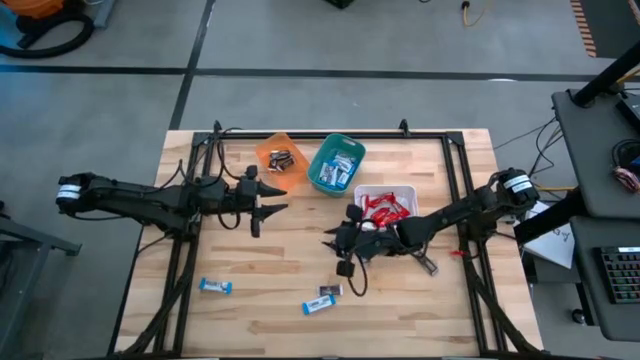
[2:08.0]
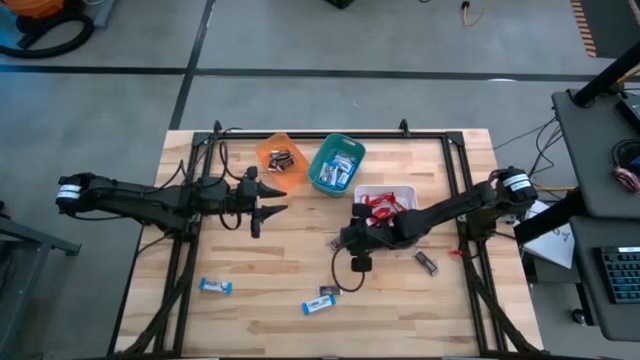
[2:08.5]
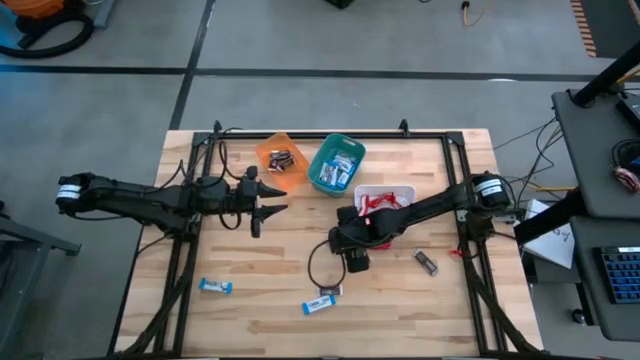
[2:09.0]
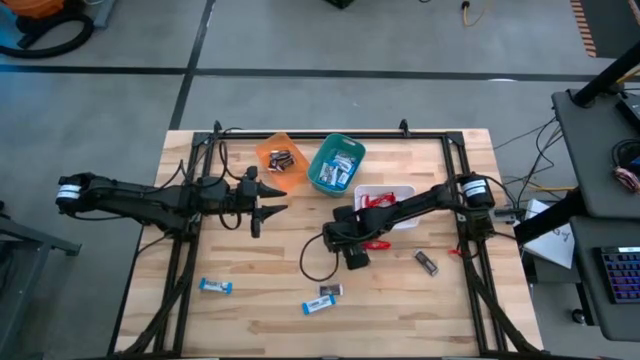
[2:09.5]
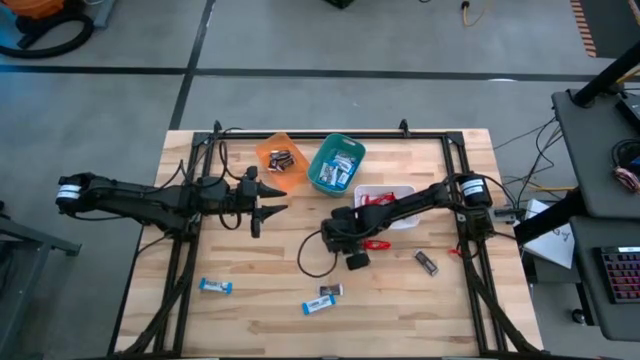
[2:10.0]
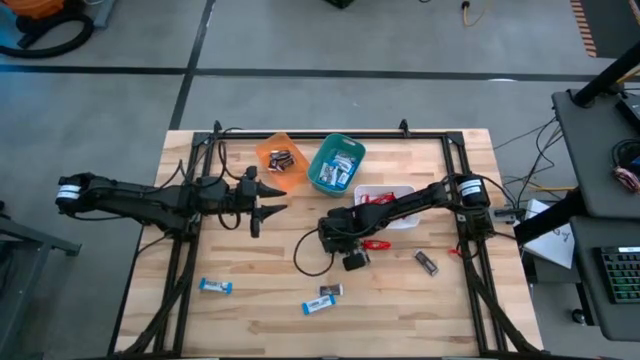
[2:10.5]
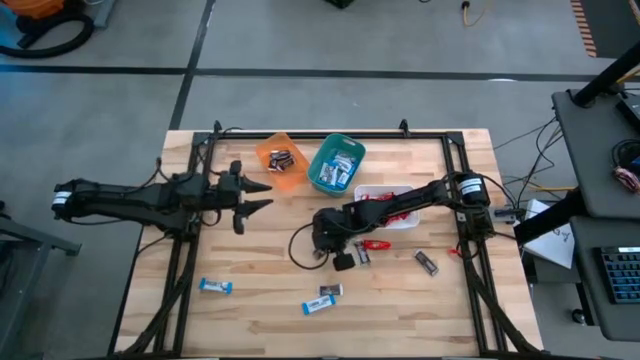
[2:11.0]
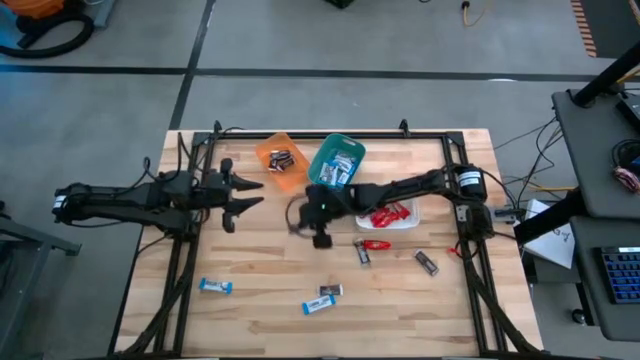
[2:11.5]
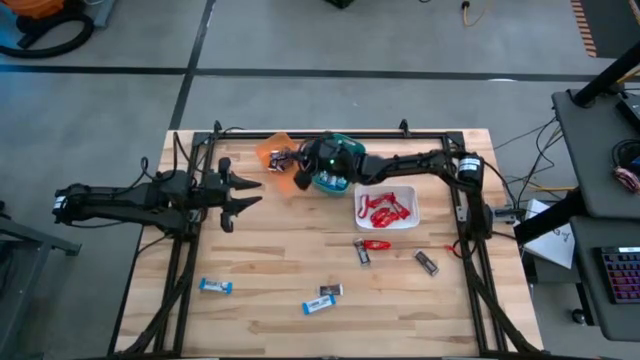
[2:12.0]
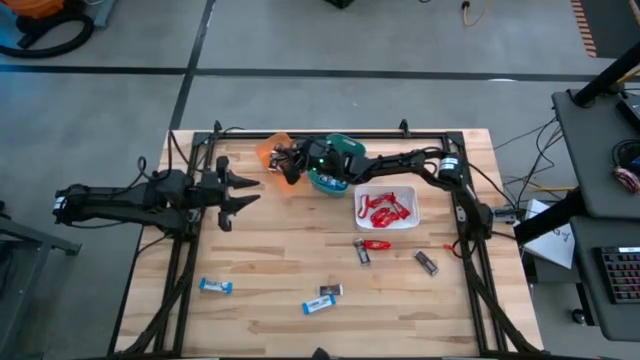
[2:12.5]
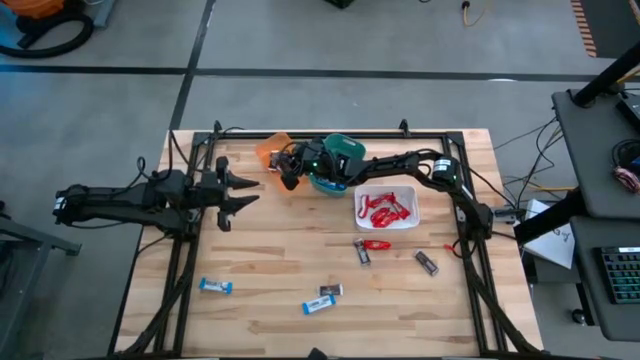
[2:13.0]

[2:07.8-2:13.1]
Task: Sort candy
Put the brown chocolate bar into the orange bin

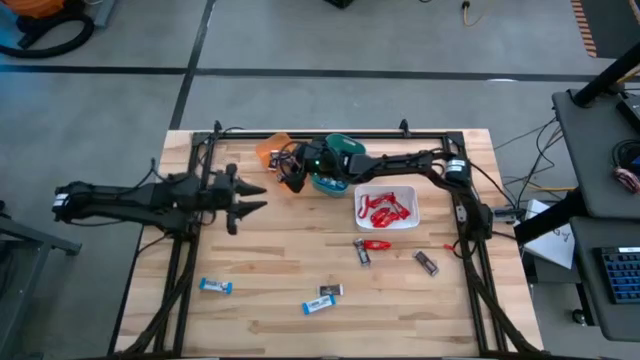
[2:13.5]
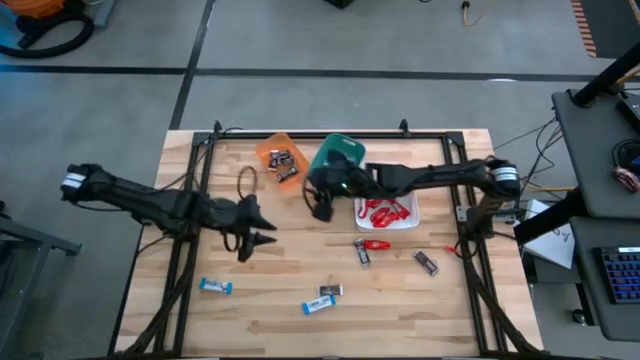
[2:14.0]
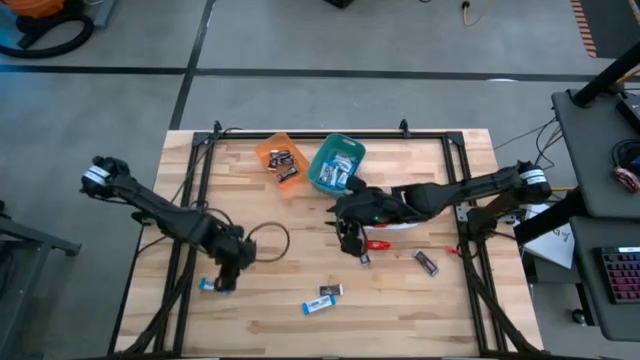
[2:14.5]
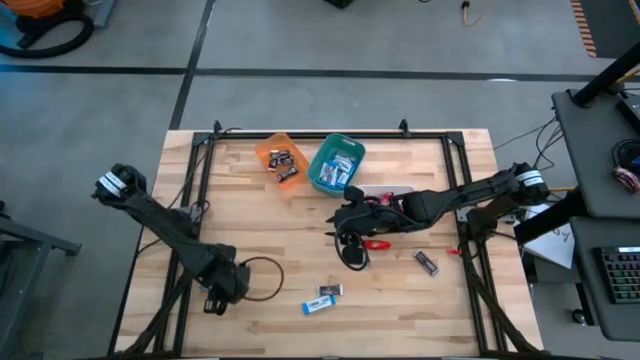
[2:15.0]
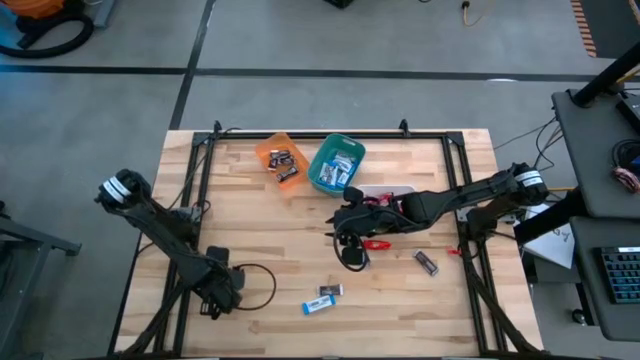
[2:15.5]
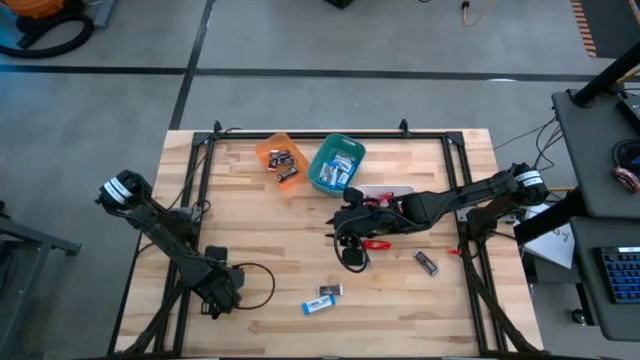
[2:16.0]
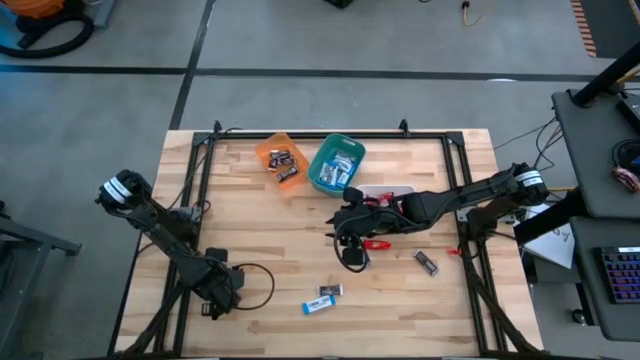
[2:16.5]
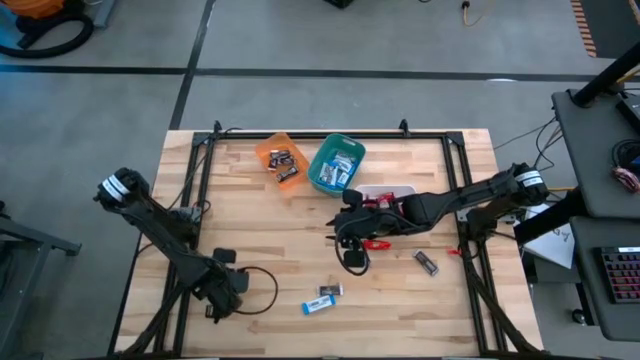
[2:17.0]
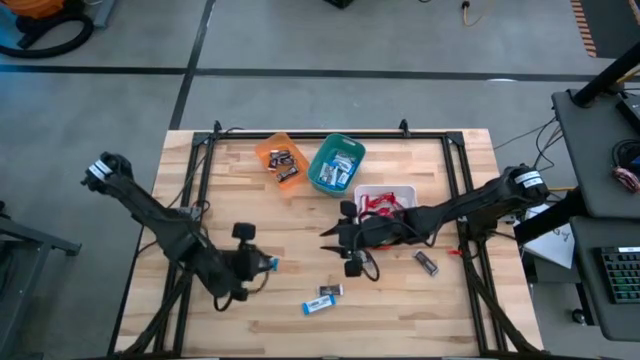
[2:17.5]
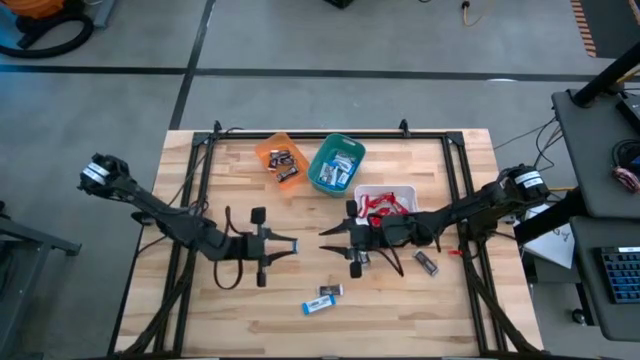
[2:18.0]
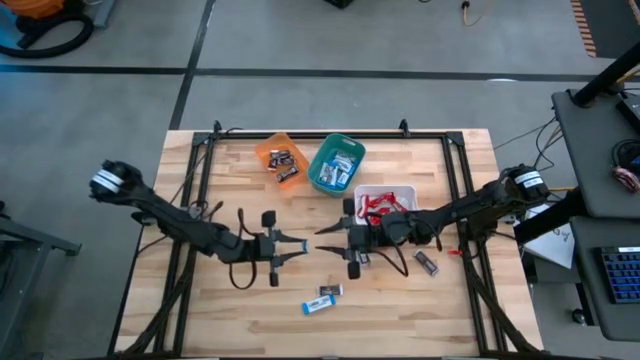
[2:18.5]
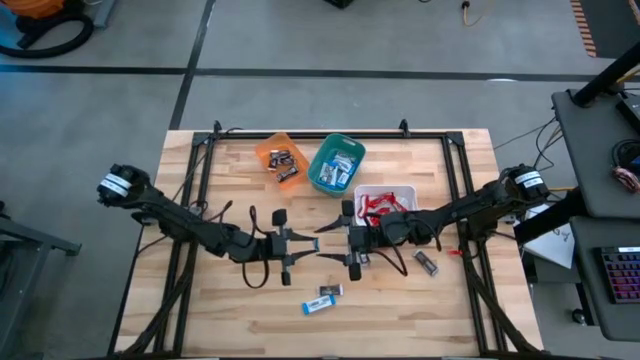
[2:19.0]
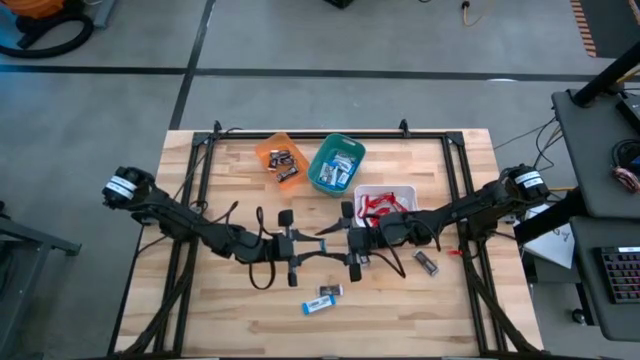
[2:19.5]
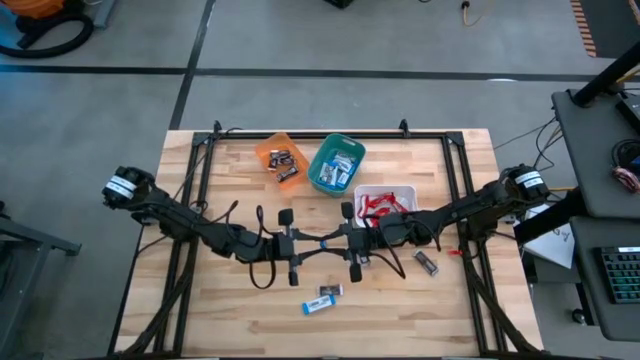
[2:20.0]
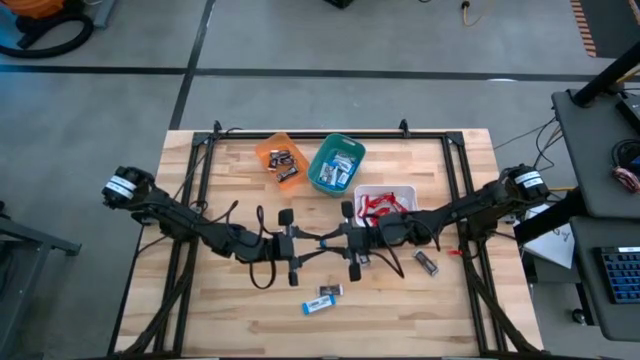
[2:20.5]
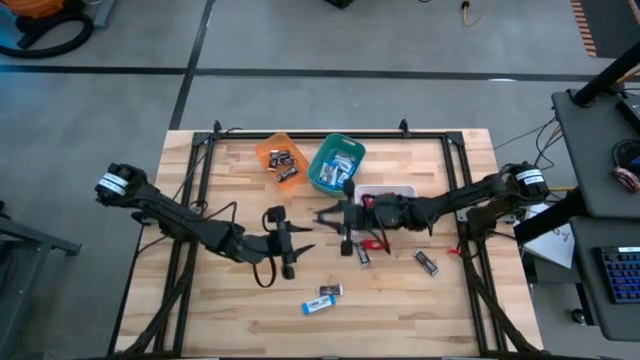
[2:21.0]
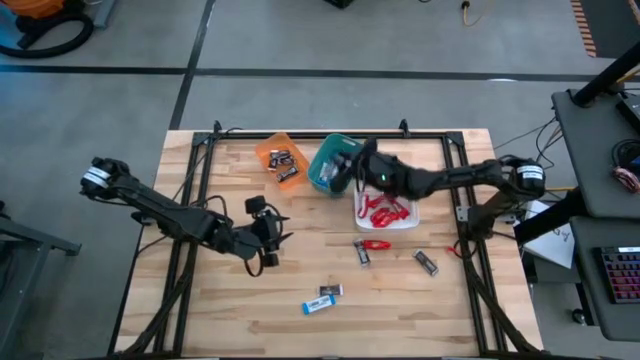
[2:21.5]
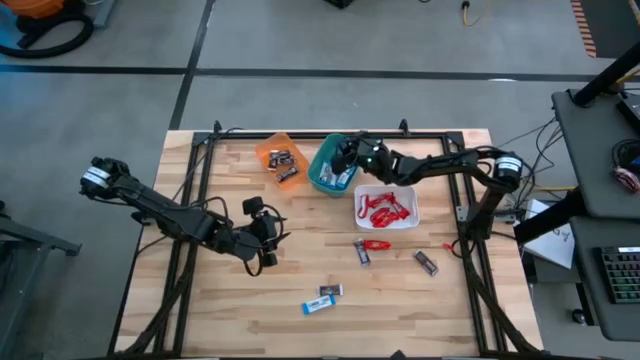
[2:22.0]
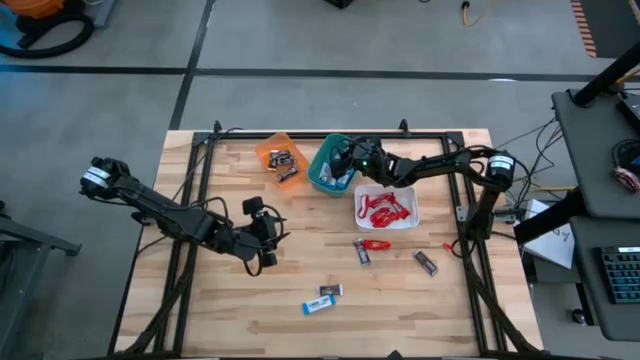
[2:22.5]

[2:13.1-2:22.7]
Put the top white chocolate bar into the green bin

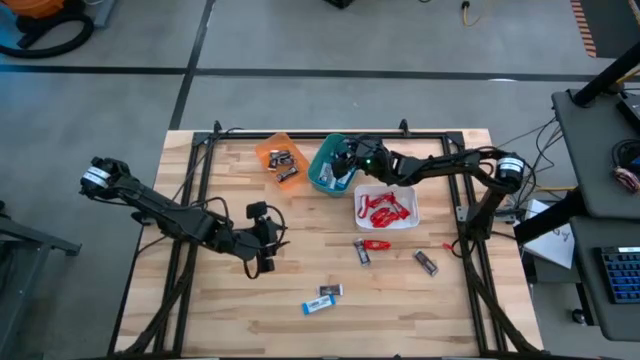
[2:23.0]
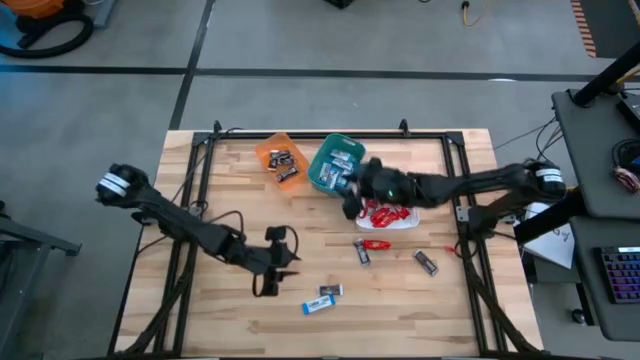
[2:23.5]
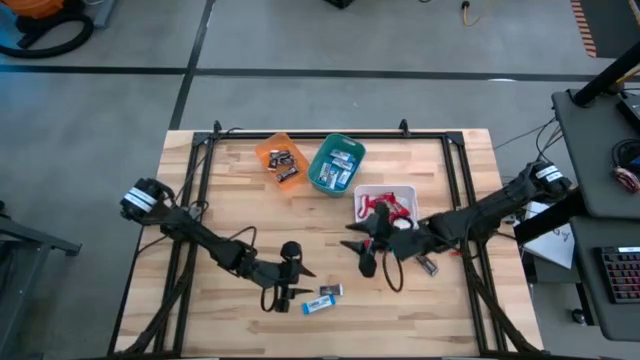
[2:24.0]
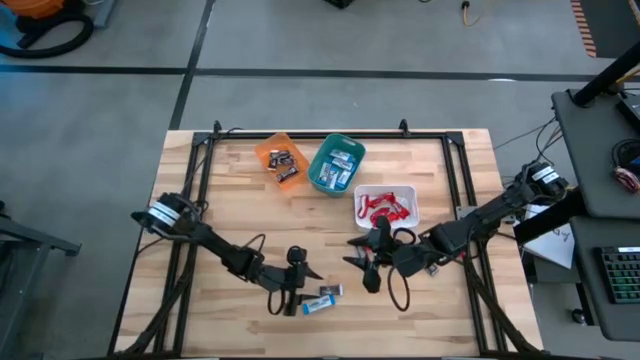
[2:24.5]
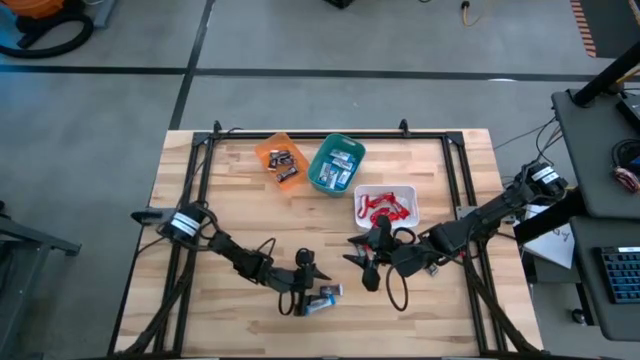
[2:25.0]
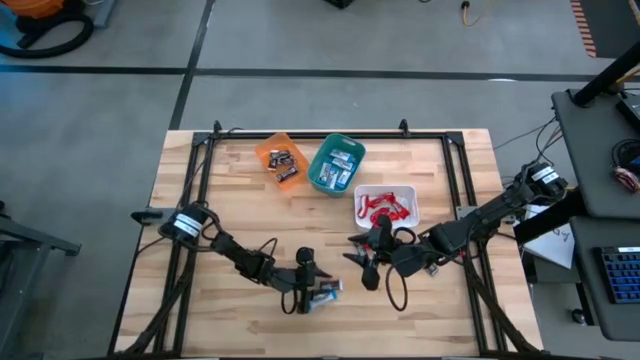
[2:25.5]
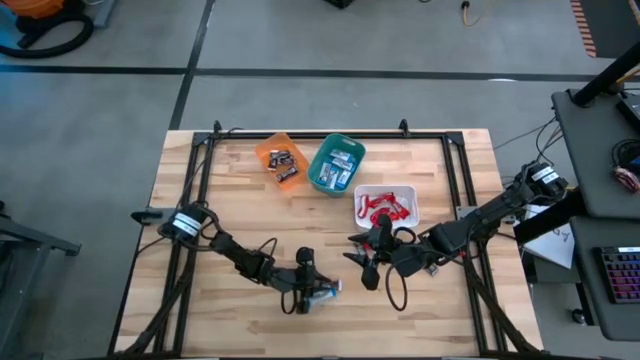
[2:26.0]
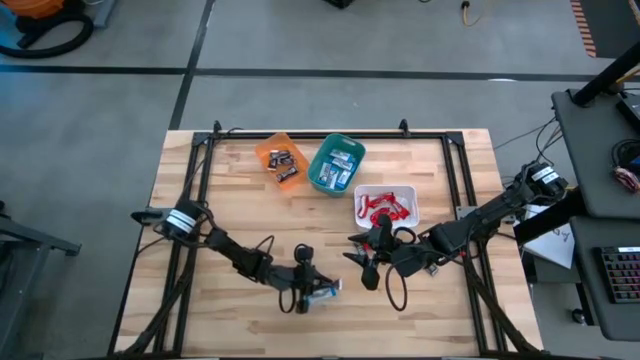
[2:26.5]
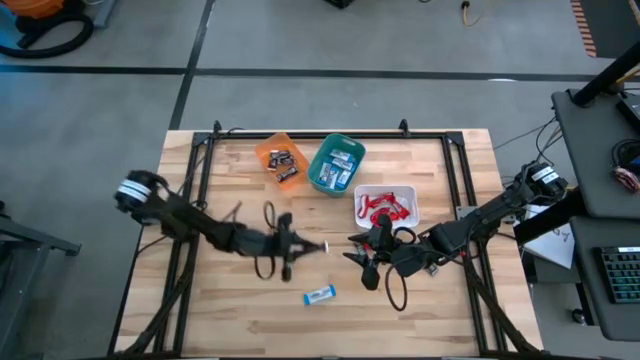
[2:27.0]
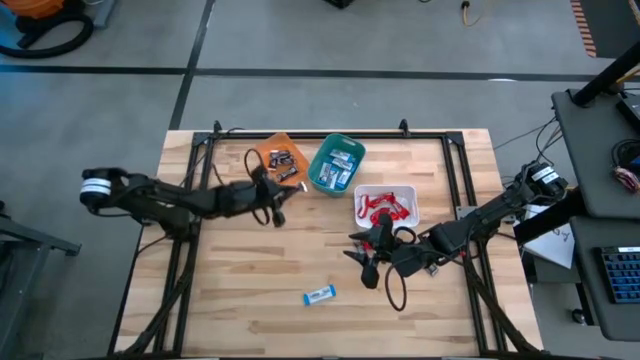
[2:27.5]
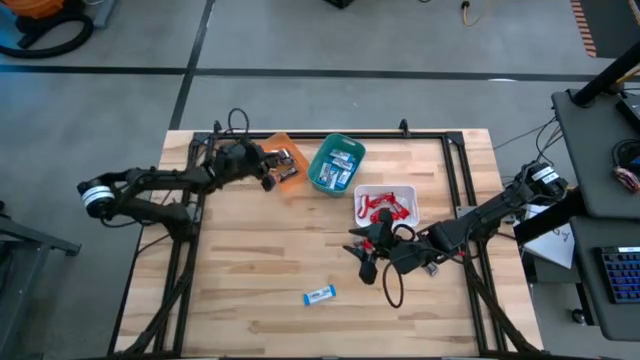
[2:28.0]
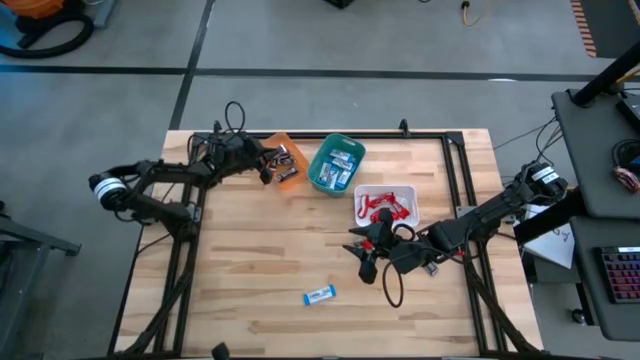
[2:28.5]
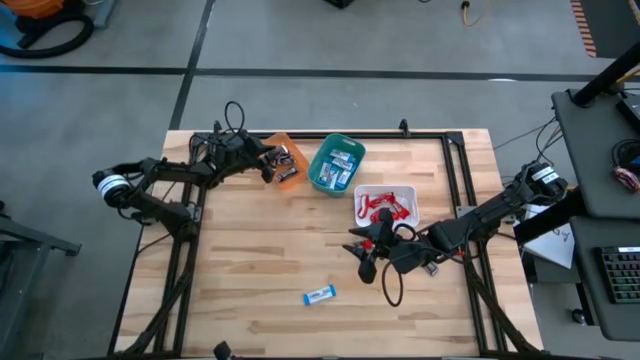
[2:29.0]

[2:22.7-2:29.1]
Put the bottom left brown chocolate bar into the orange bin
